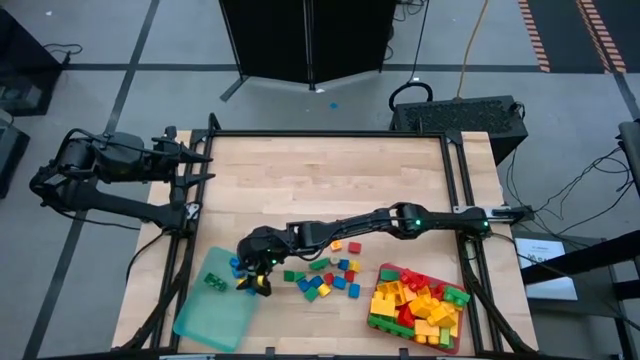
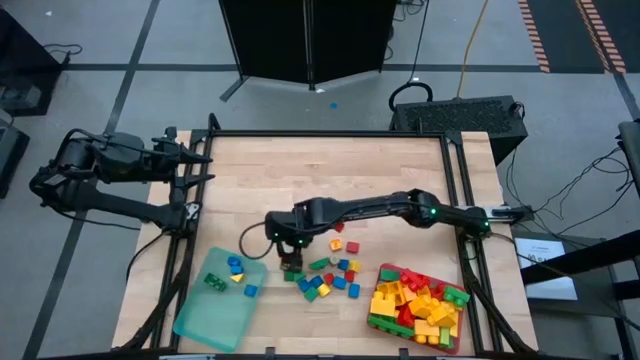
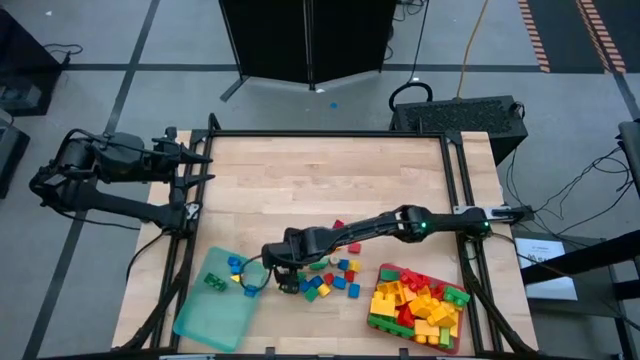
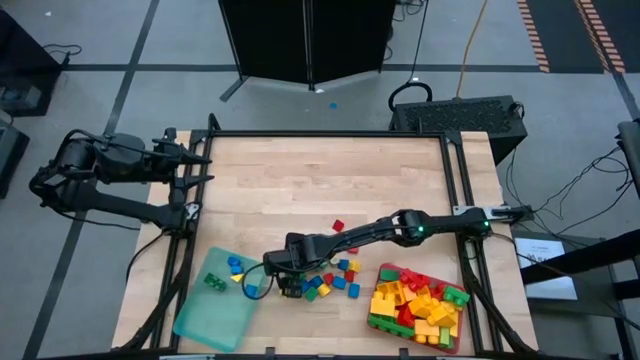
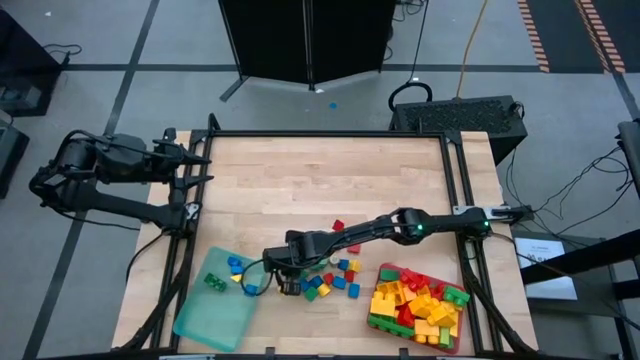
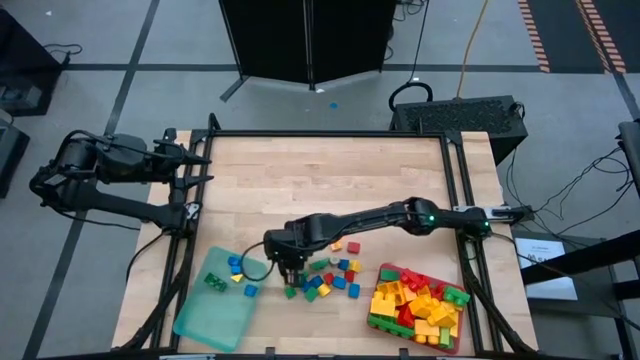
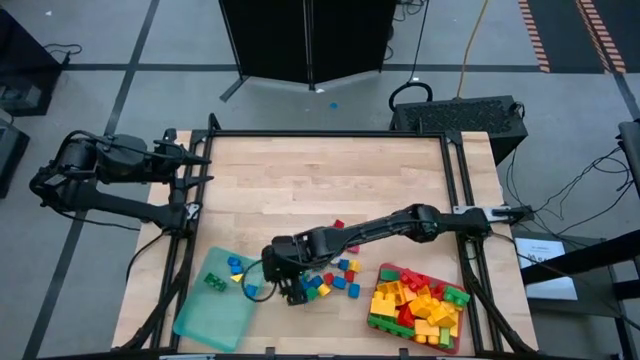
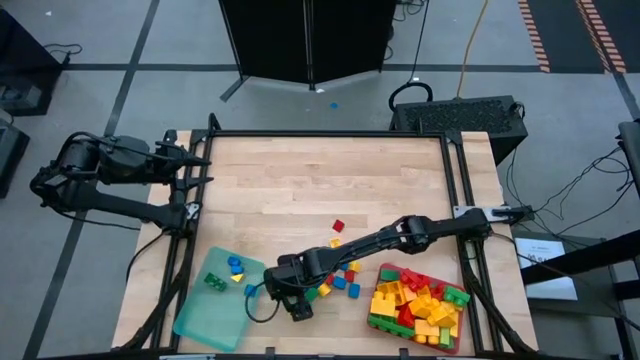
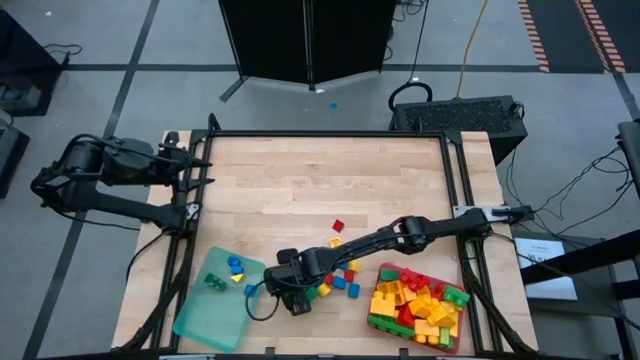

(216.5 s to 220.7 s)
Task: Sort blocks by size
Put the green block into the blue bin

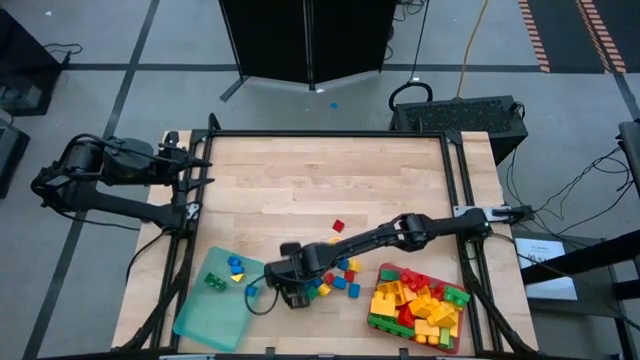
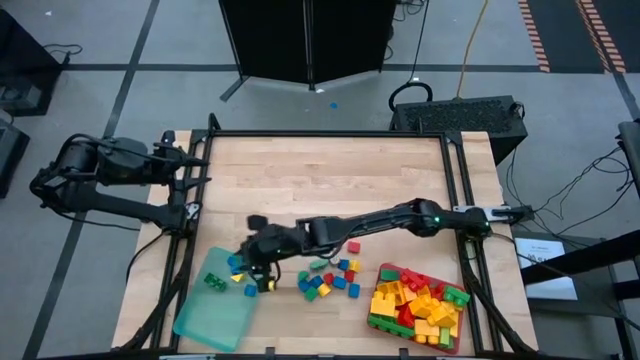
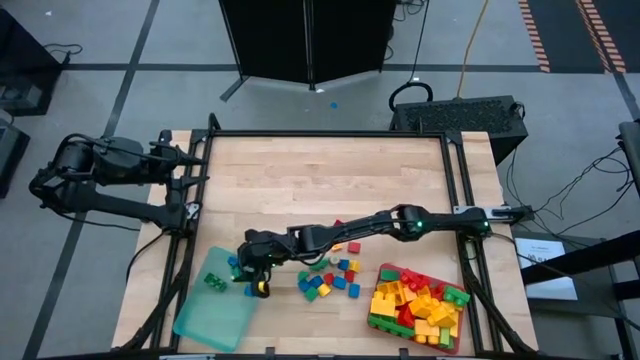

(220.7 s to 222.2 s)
Put the green block into the blue bin

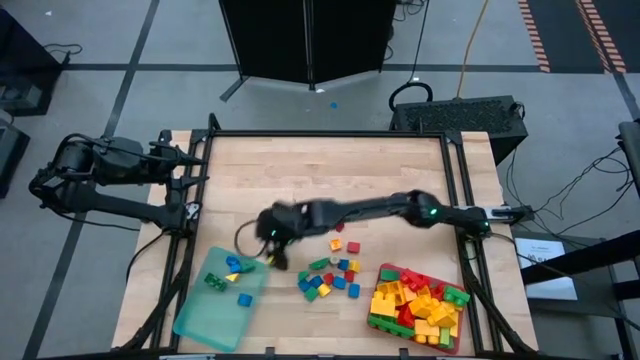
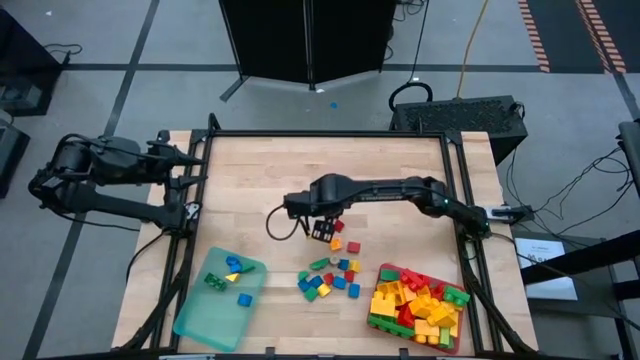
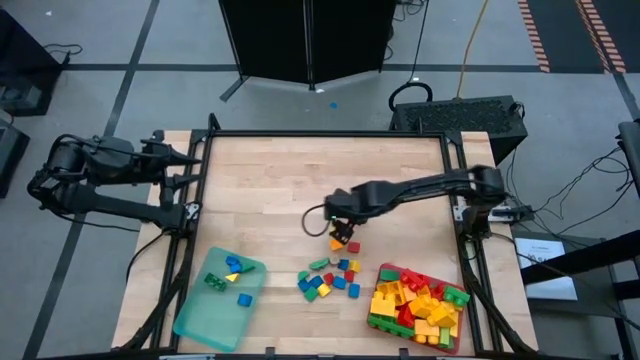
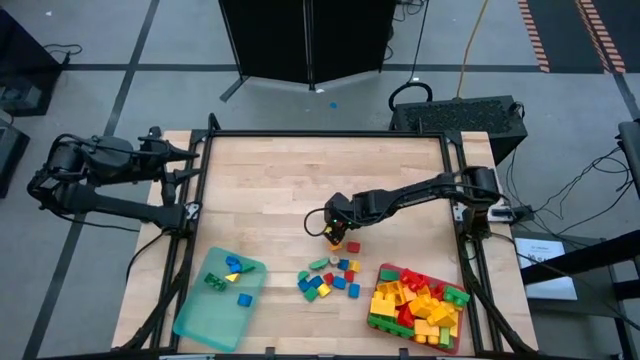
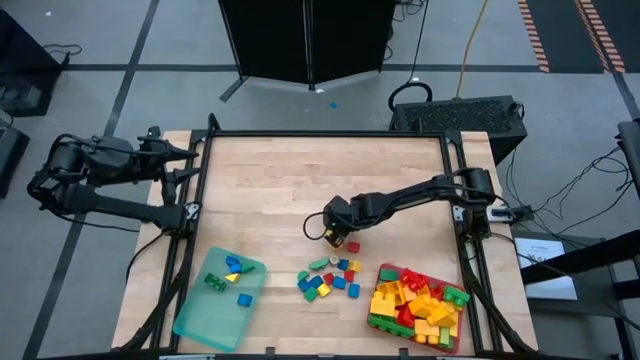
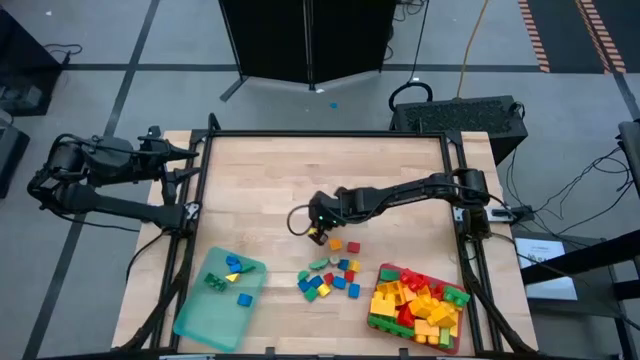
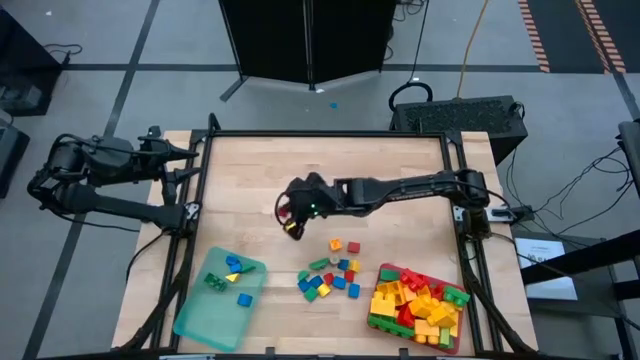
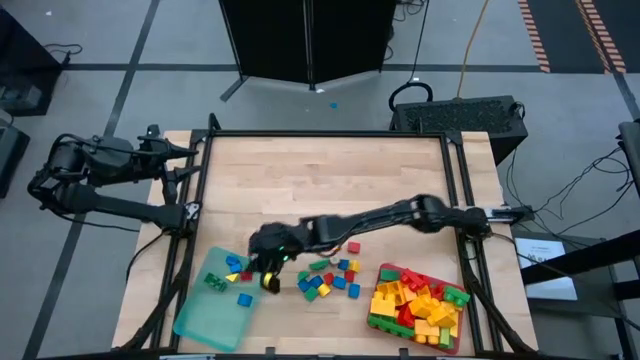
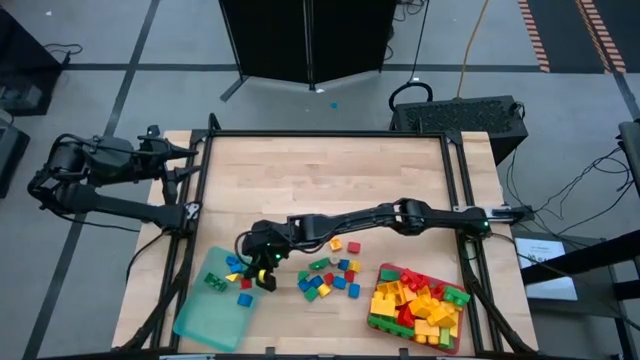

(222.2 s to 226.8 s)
Put the red block into the blue bin

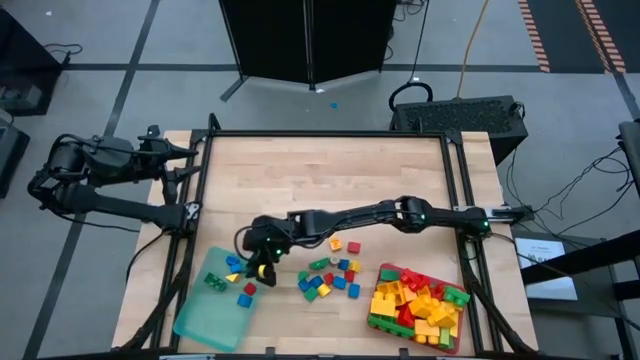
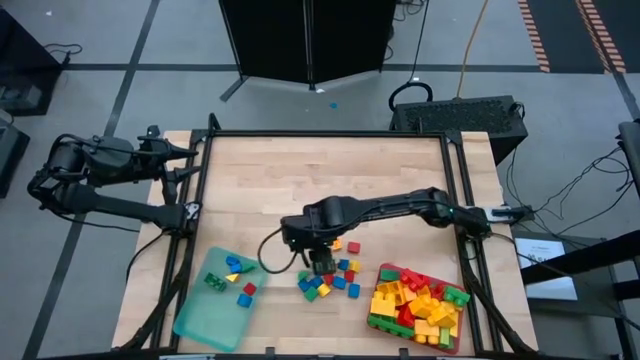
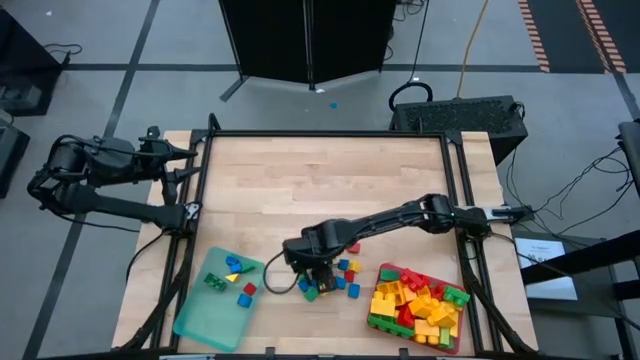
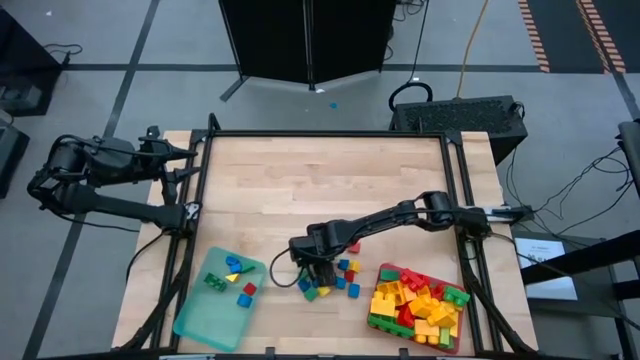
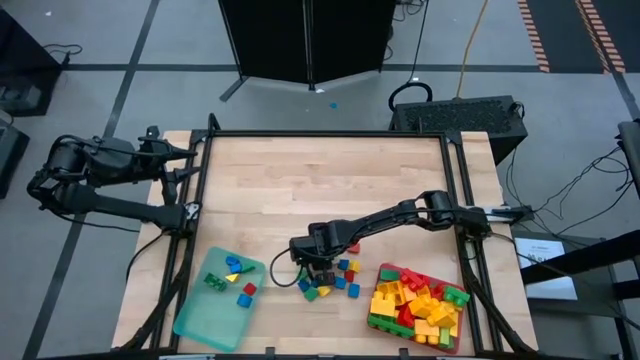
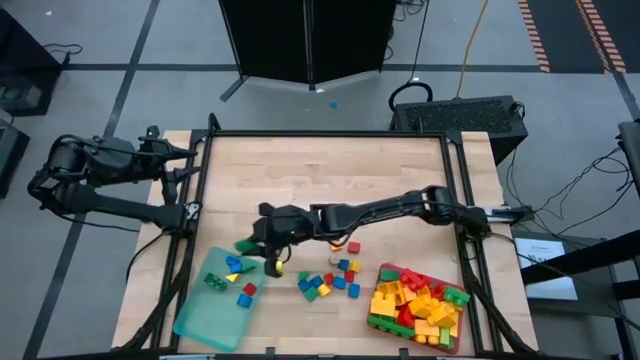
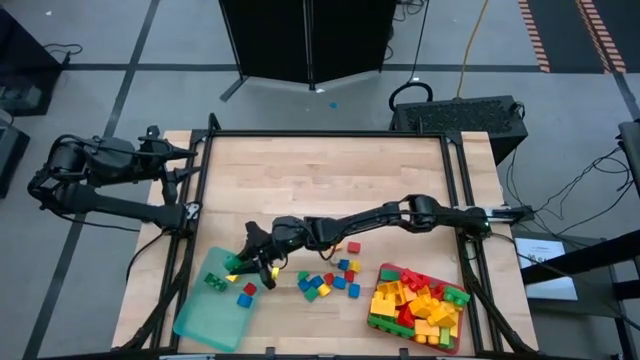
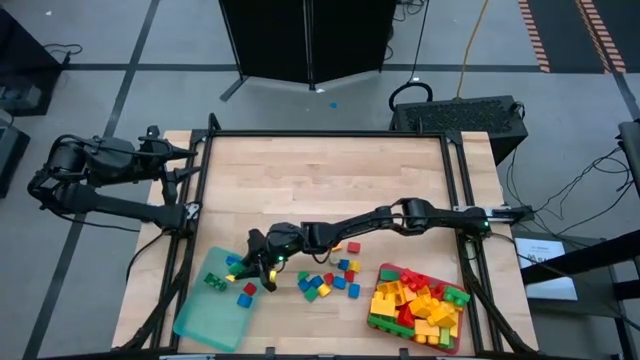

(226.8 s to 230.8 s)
Put the 4-stud green game piece into the blue bin

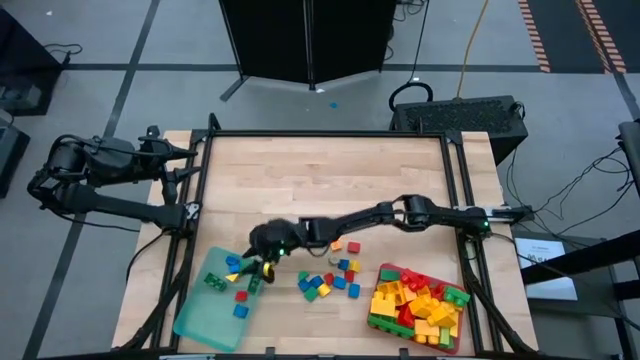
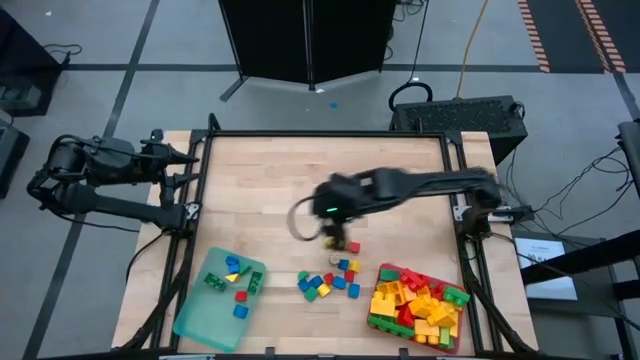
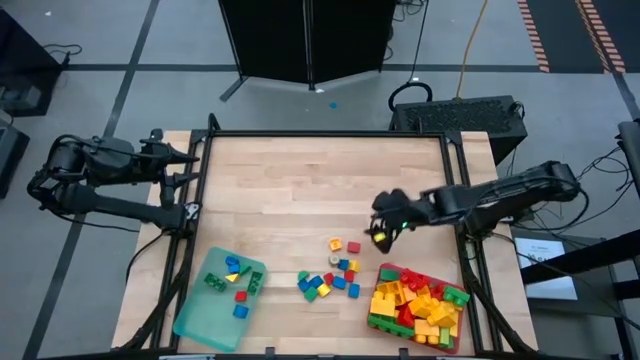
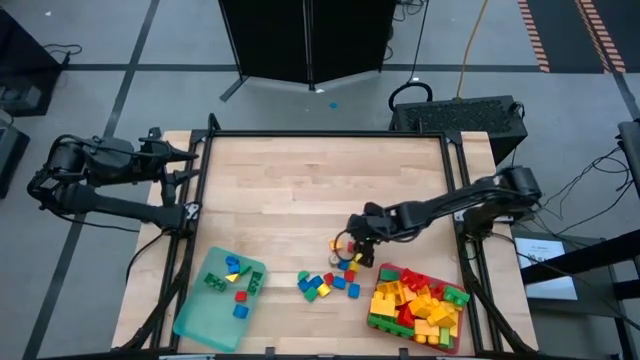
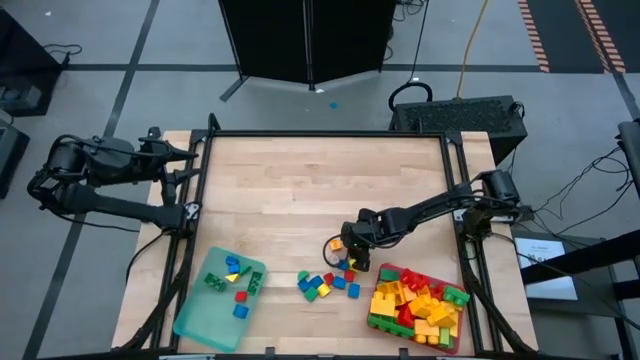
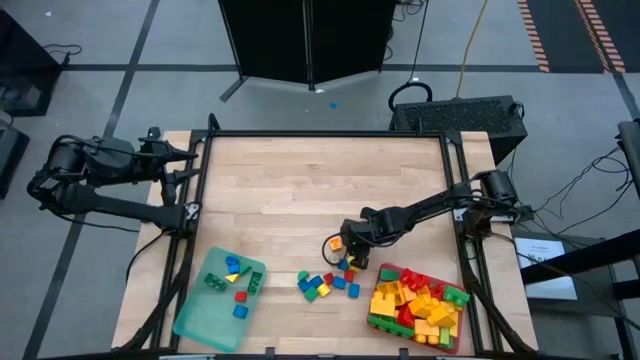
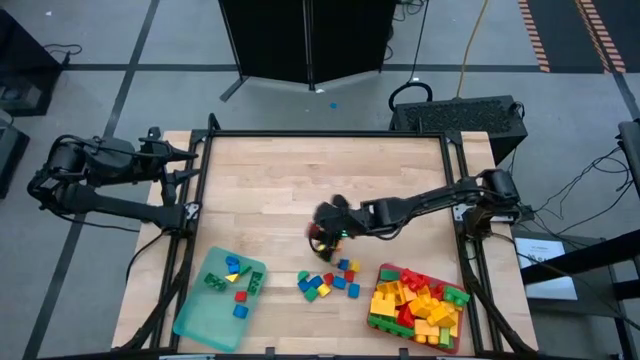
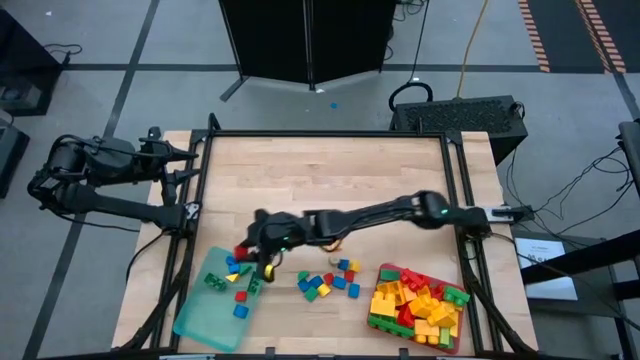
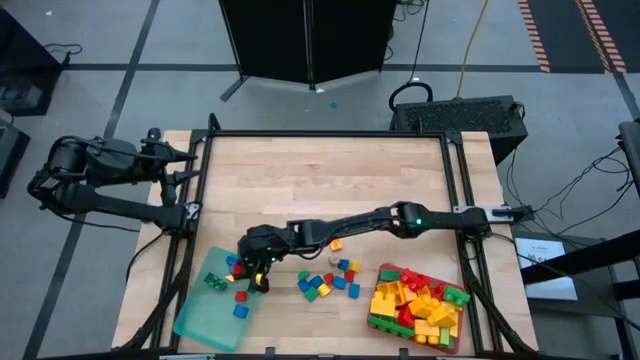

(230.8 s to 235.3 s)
Put the red block into the blue bin

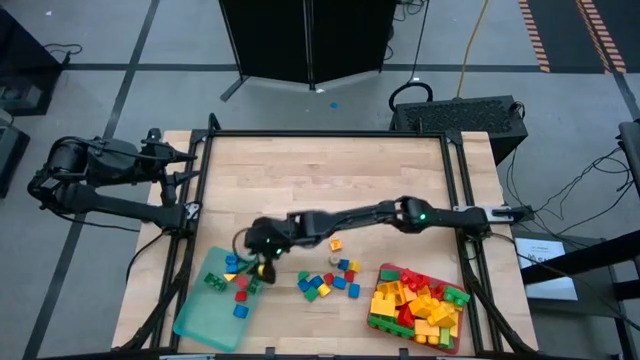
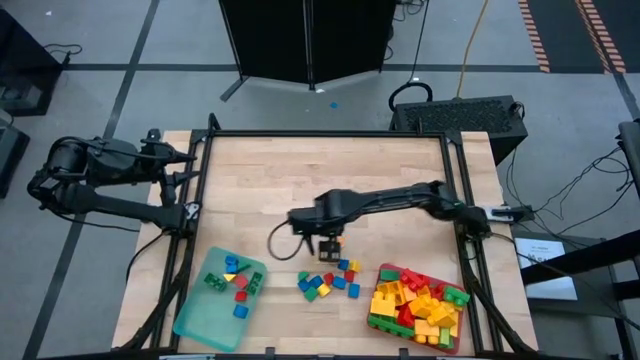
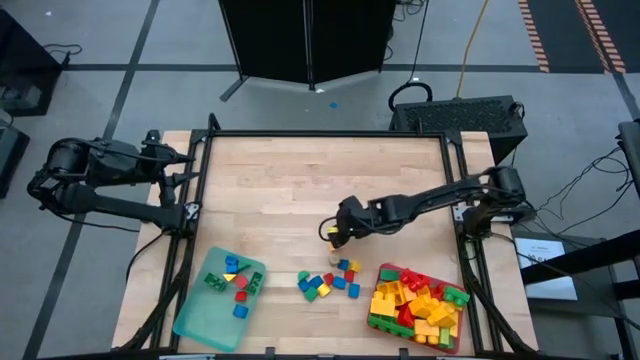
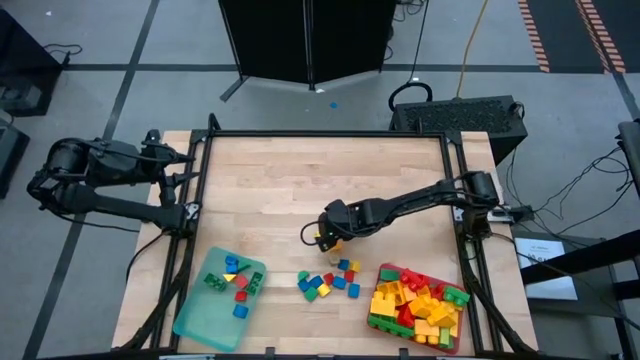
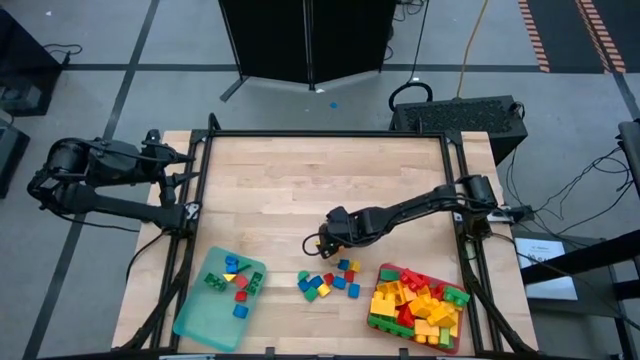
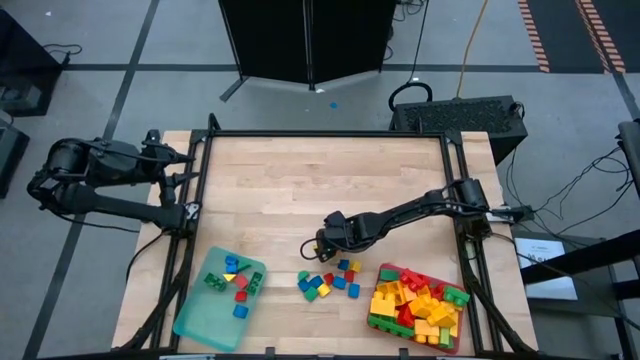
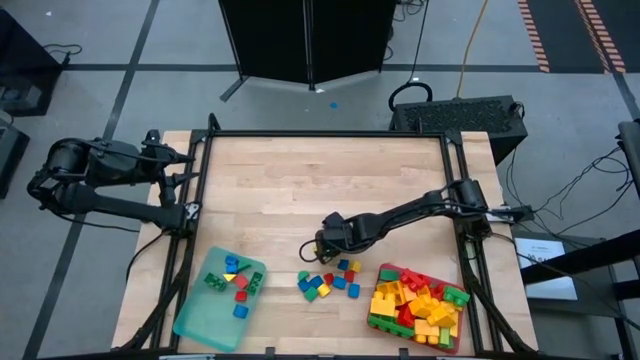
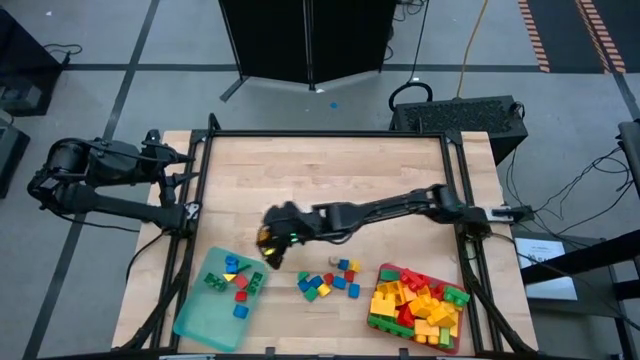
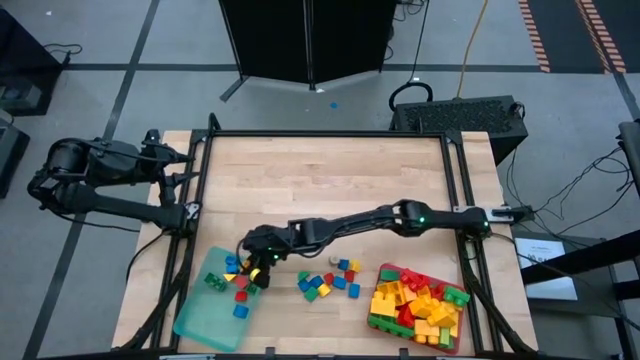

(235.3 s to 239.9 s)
Put the 1-stud yellow game piece into the blue bin
